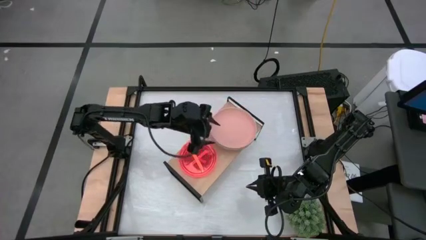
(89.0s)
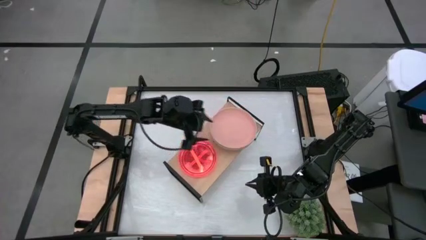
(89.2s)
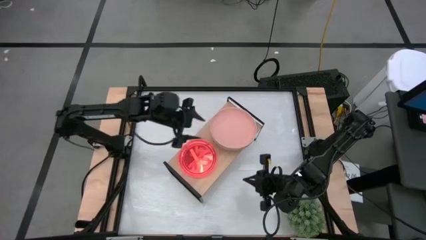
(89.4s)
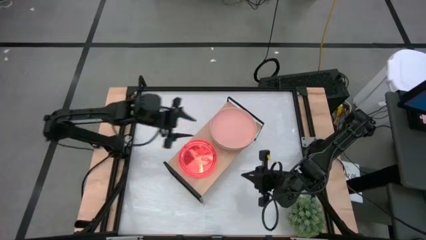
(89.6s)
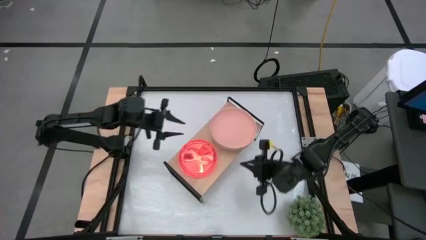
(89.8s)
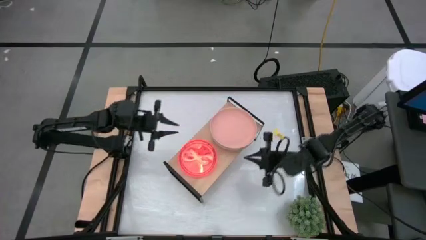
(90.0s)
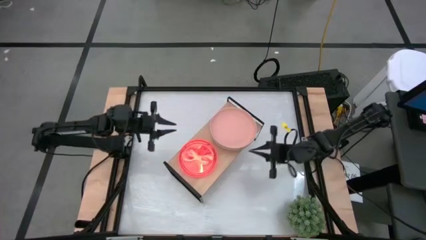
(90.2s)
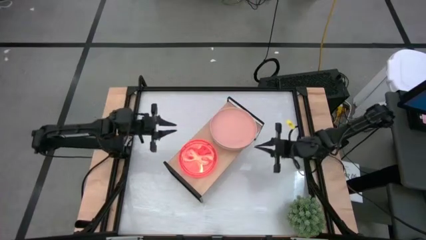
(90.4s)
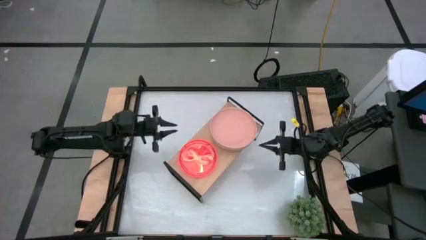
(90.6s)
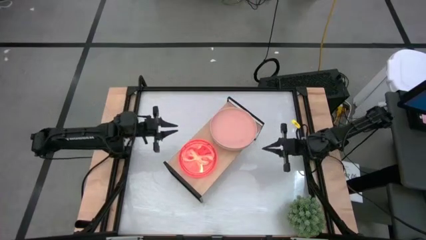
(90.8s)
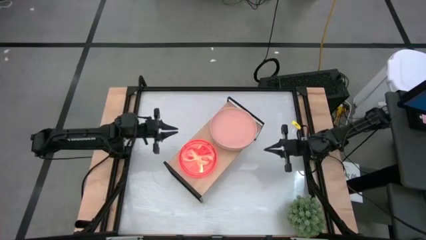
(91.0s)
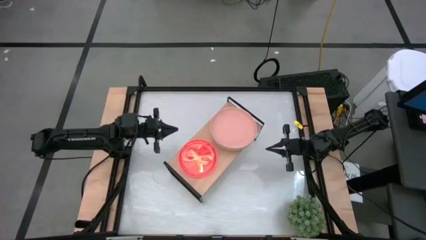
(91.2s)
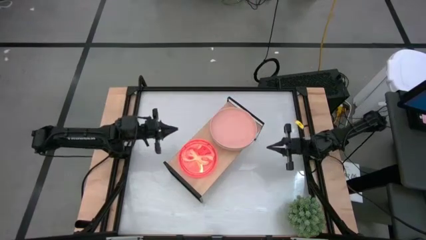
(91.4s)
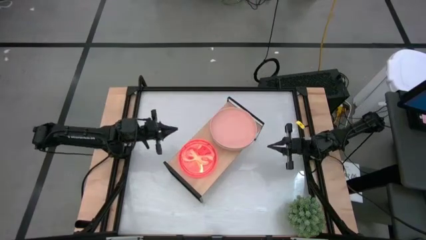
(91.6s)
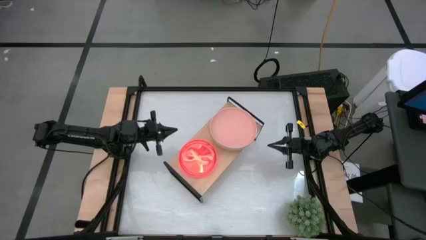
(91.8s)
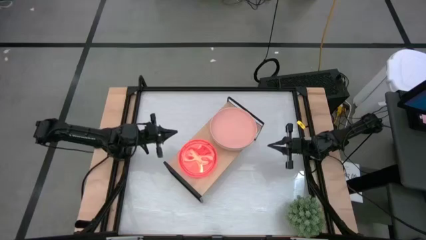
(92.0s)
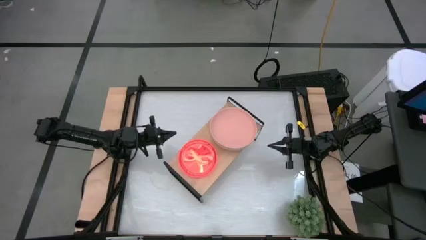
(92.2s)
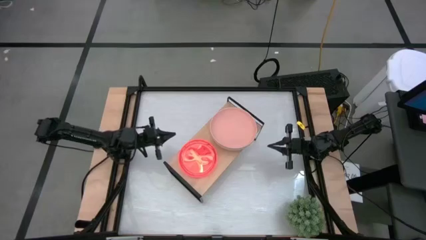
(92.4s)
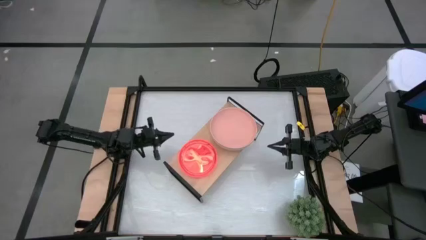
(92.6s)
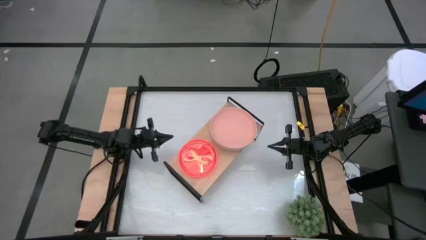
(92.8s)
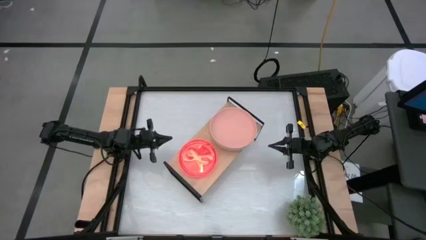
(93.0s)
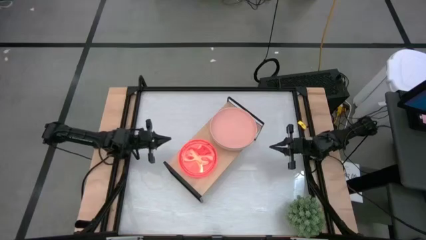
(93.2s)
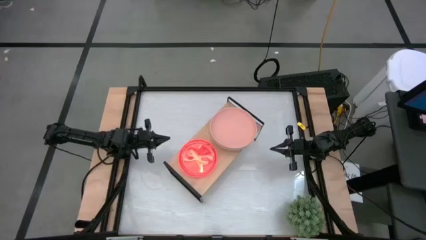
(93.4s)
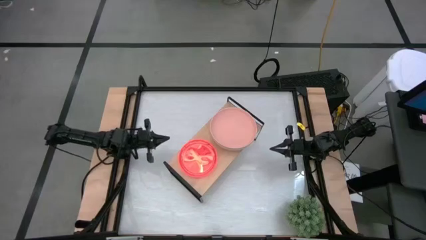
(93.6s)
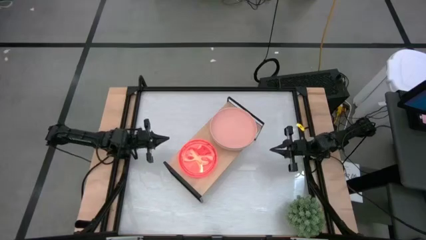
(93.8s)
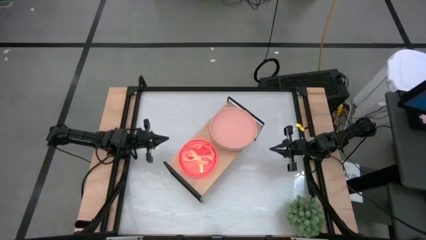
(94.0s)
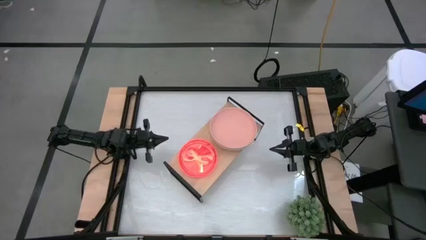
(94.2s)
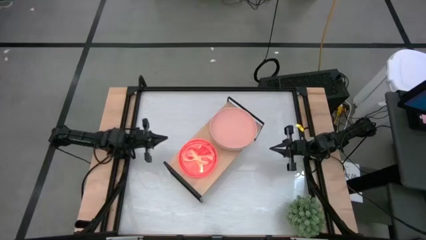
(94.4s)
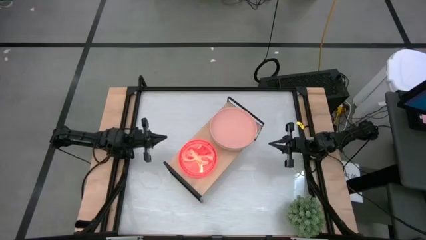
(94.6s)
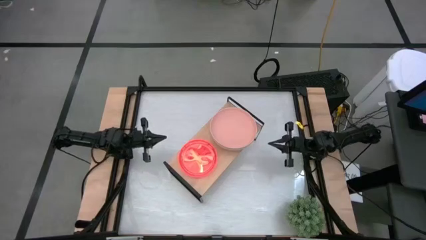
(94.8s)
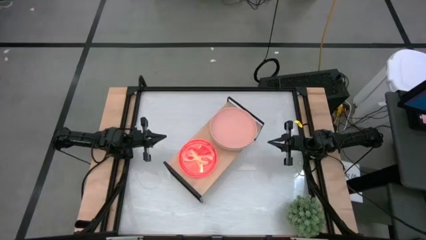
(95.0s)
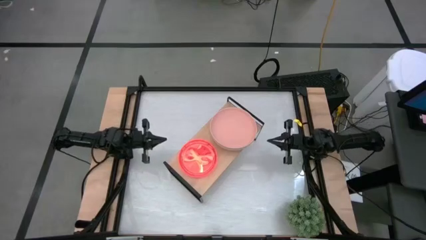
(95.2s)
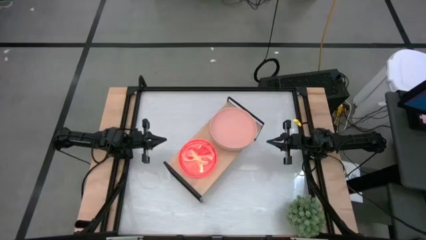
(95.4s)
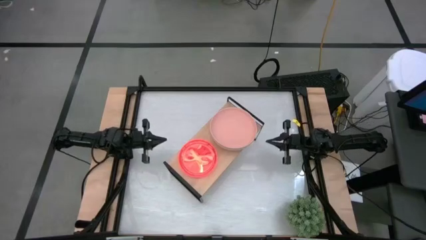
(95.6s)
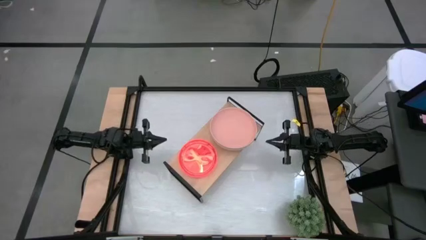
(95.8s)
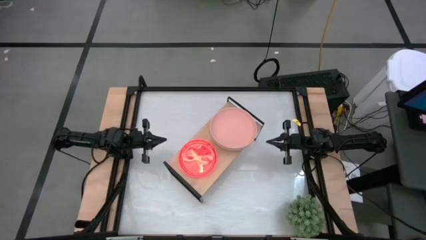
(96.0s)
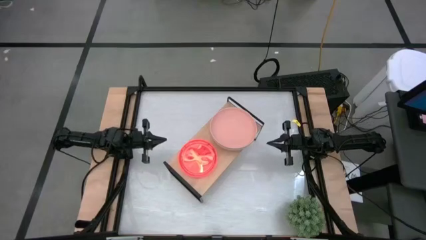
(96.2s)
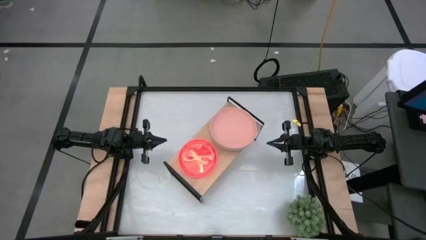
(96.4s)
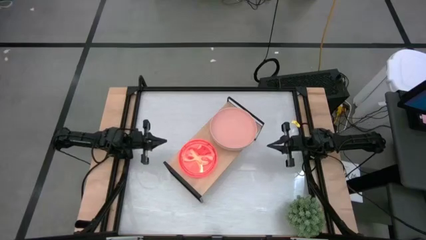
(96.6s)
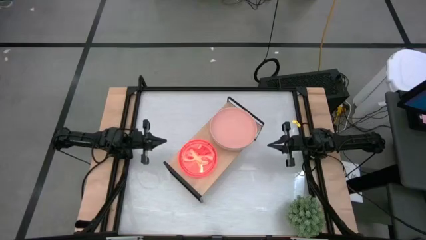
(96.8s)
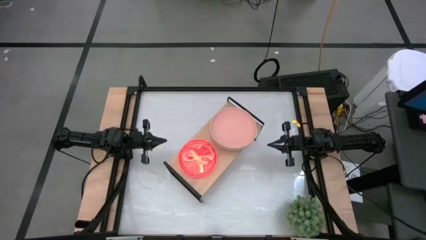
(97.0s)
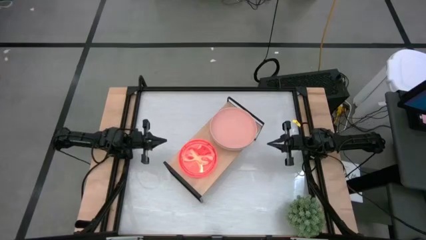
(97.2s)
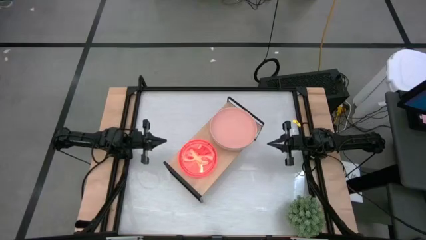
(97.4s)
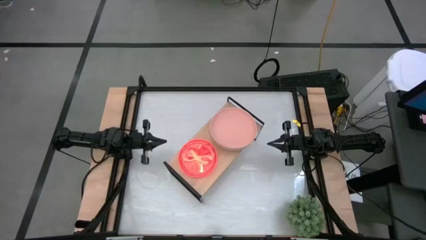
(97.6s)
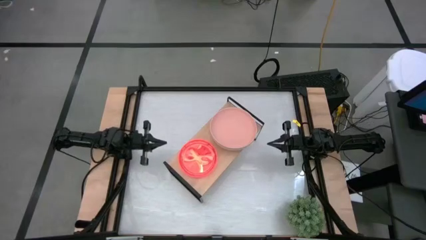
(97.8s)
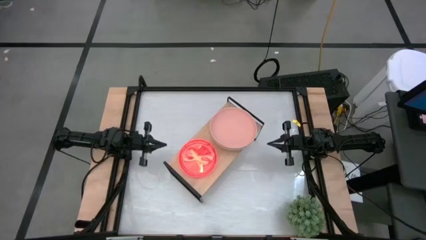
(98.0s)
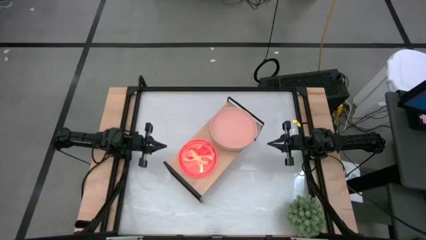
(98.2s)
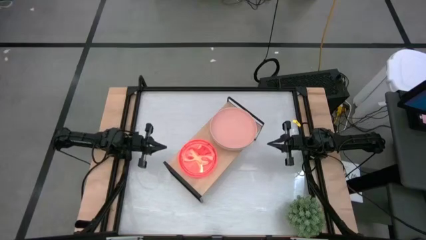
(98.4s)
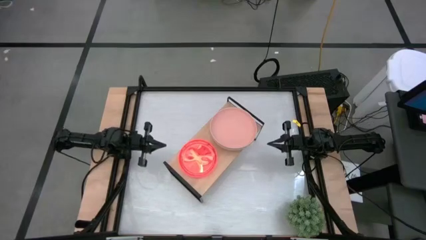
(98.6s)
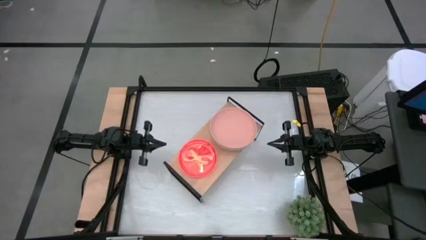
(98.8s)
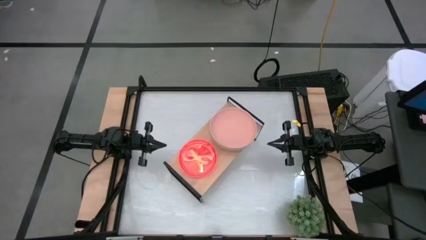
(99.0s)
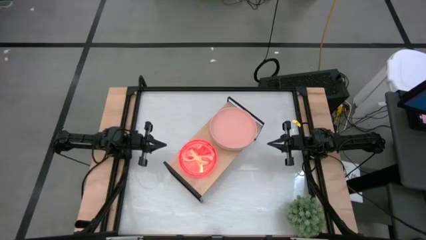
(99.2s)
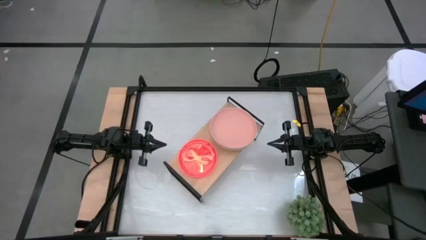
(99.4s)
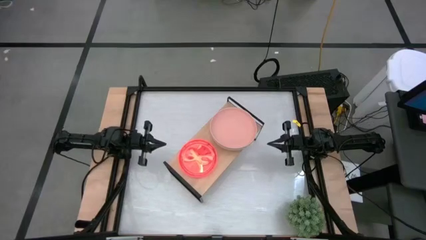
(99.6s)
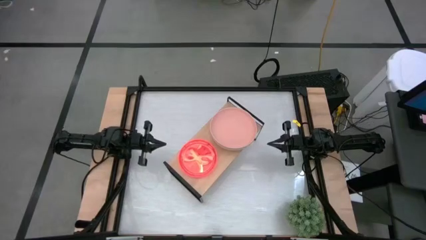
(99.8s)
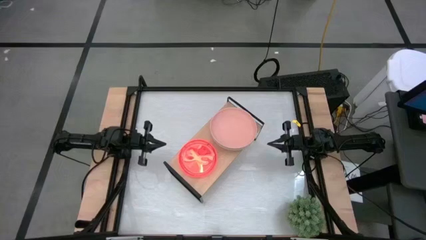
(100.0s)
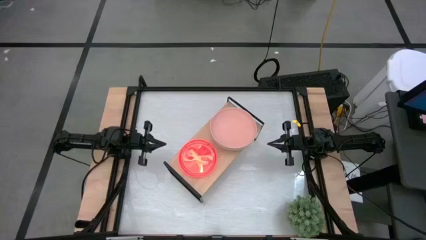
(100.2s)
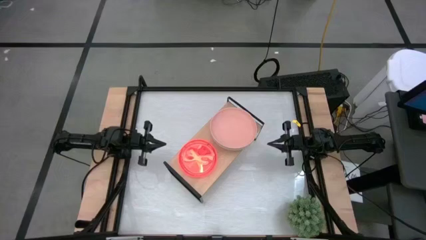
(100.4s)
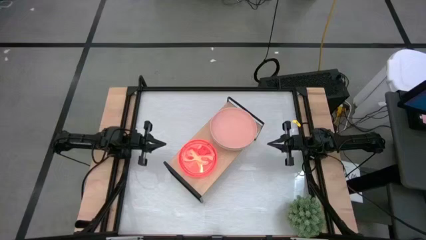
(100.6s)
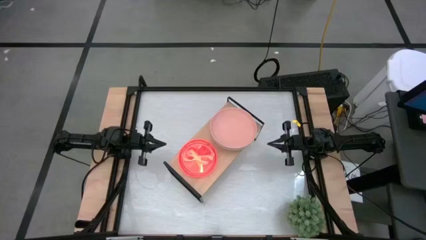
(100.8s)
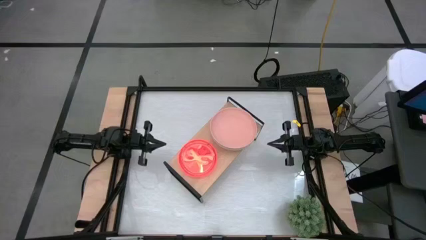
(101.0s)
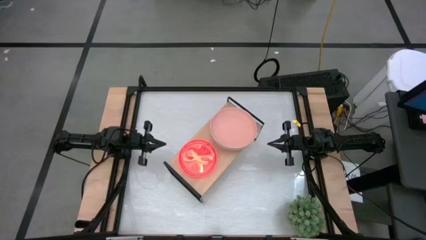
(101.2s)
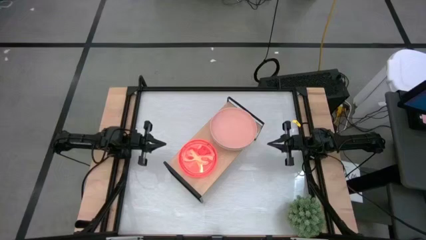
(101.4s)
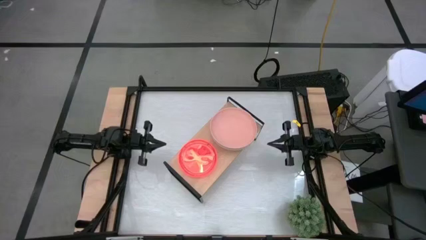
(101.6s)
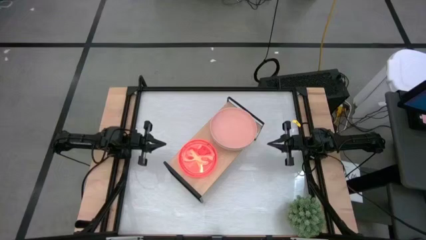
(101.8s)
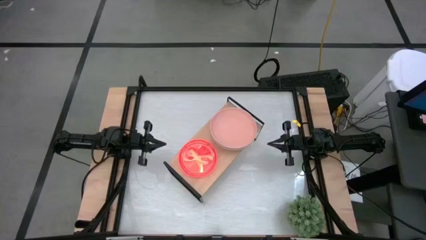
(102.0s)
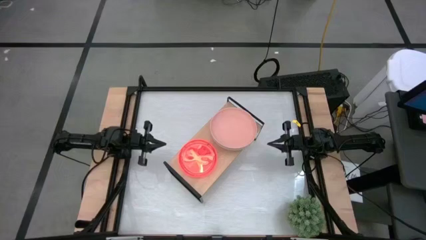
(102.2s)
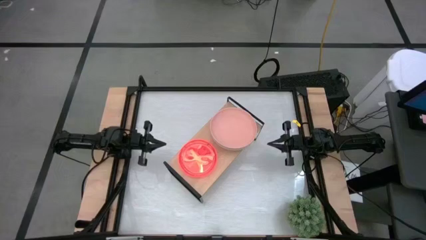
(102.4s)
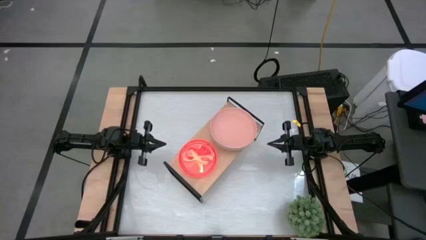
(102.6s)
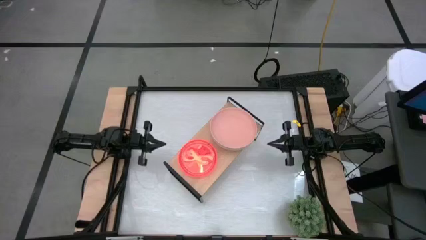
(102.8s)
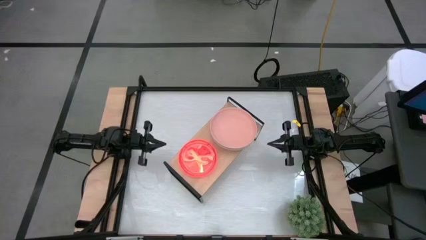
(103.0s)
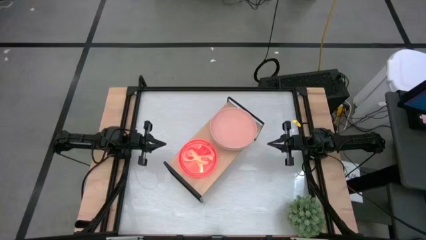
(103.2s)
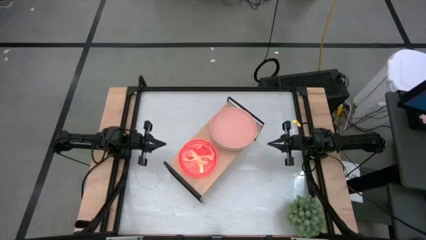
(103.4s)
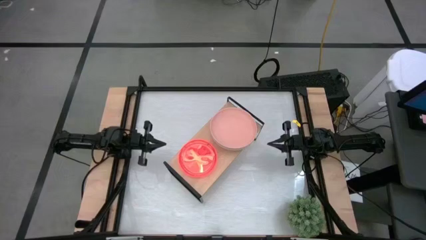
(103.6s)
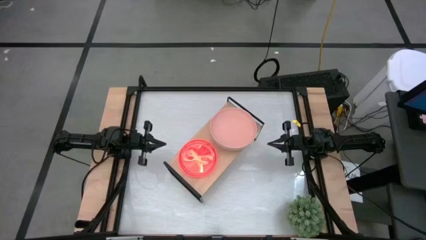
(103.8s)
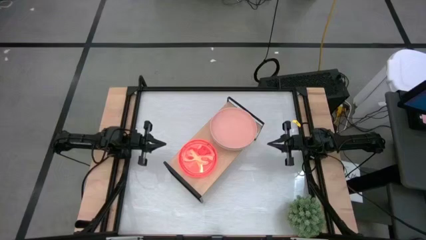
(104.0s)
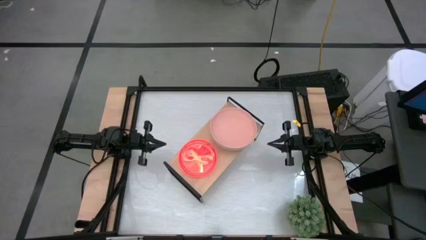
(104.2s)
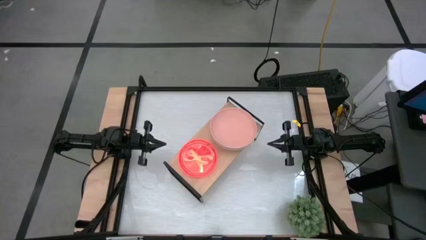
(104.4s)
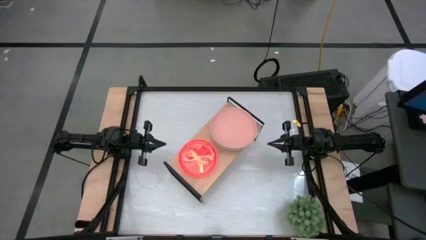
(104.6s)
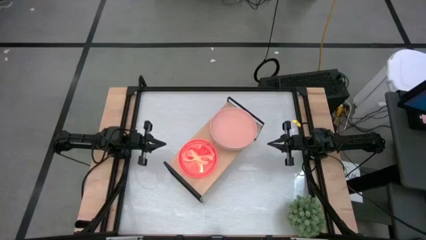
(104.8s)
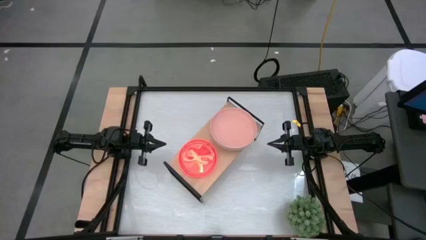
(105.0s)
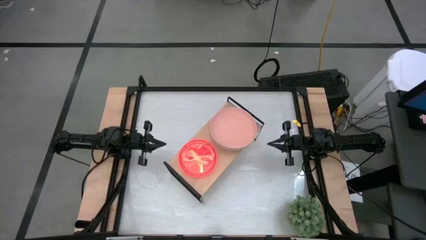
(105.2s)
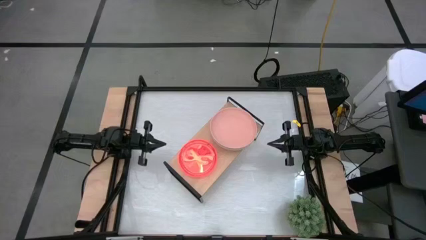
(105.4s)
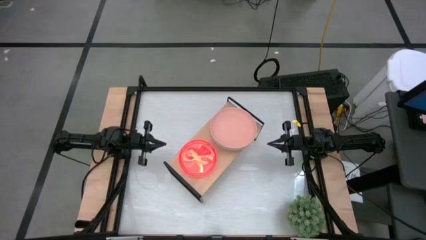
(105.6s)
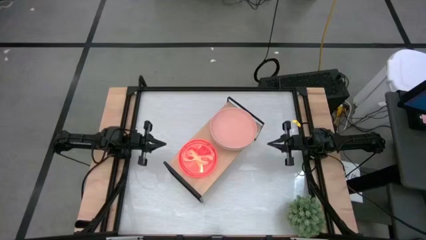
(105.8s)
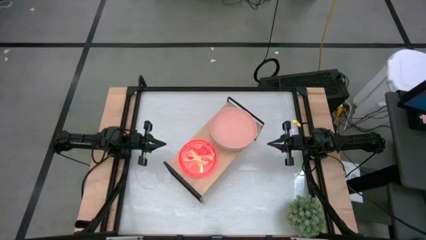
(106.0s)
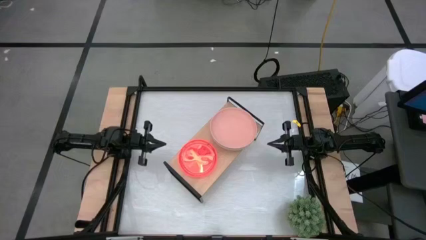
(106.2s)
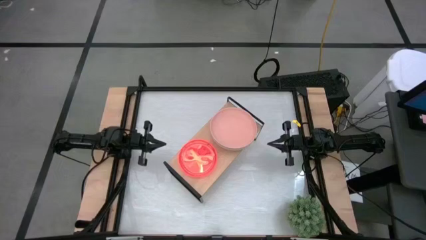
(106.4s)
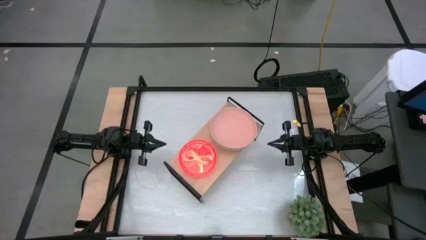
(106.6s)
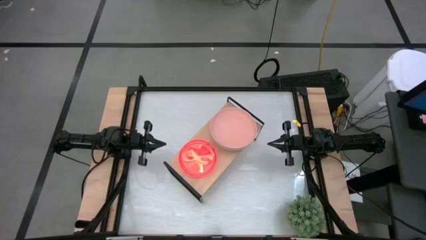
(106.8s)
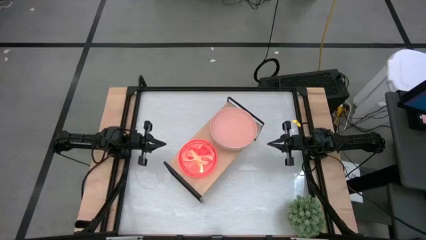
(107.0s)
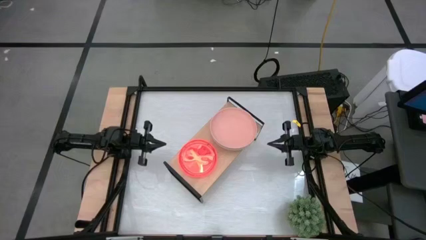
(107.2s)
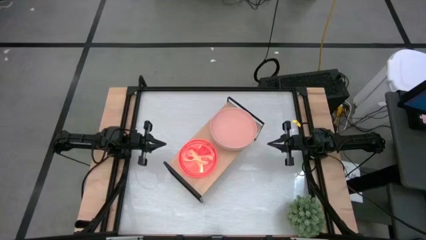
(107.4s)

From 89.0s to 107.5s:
Task: Place and stack plates onto a shelf
Return to Home Position
